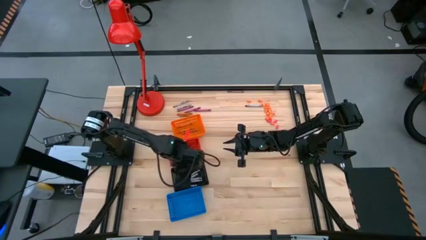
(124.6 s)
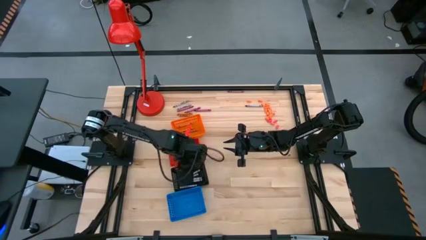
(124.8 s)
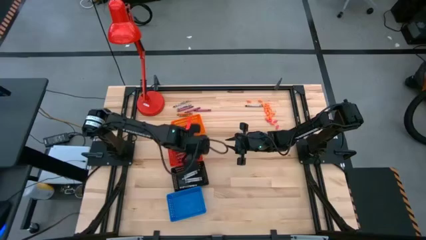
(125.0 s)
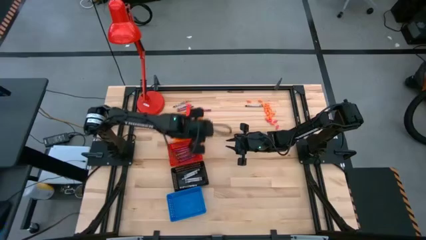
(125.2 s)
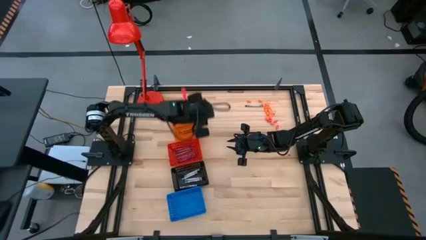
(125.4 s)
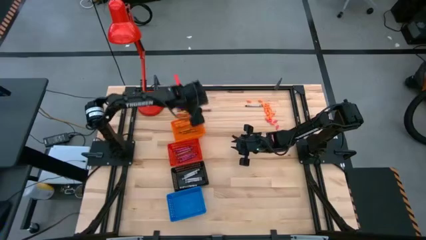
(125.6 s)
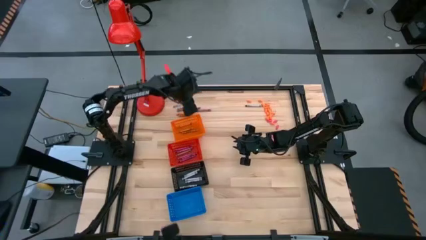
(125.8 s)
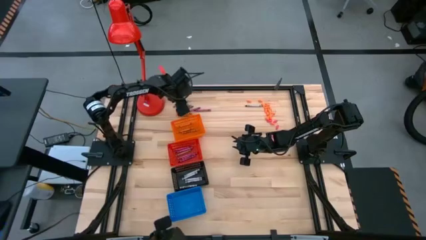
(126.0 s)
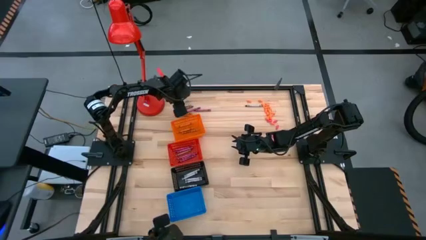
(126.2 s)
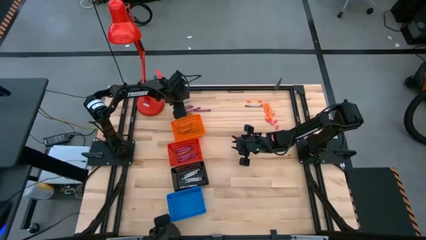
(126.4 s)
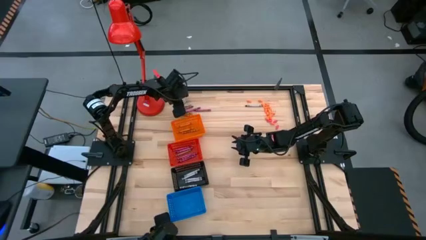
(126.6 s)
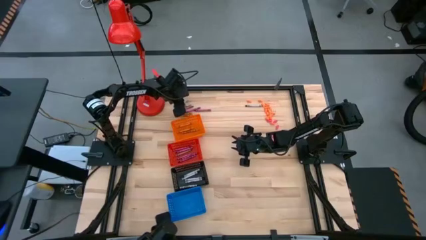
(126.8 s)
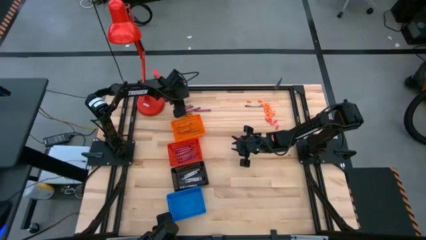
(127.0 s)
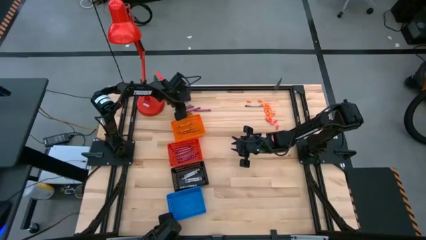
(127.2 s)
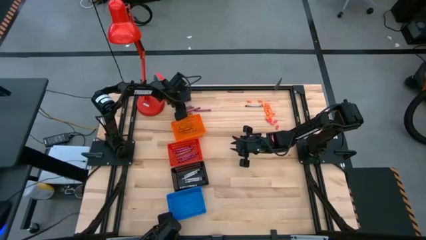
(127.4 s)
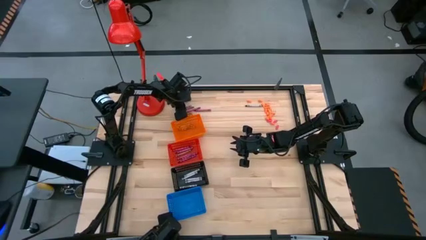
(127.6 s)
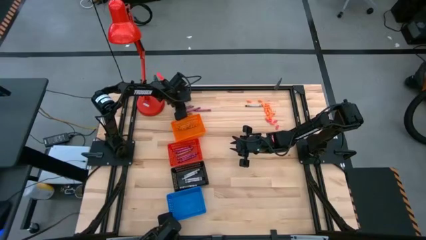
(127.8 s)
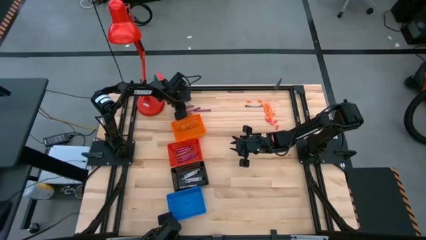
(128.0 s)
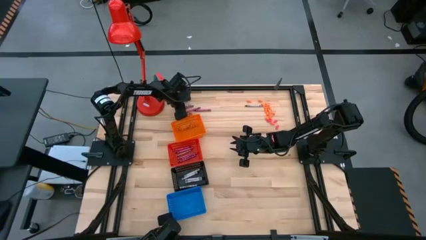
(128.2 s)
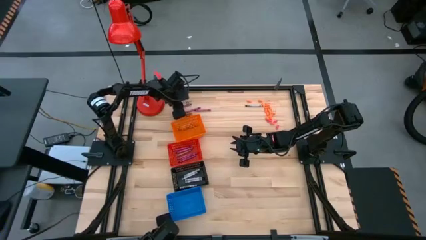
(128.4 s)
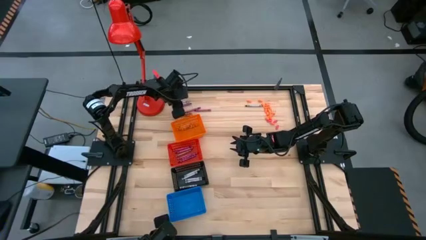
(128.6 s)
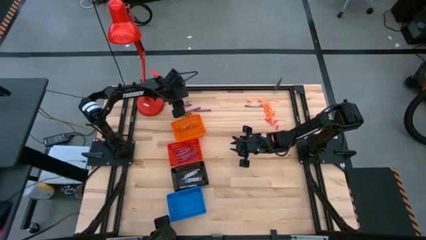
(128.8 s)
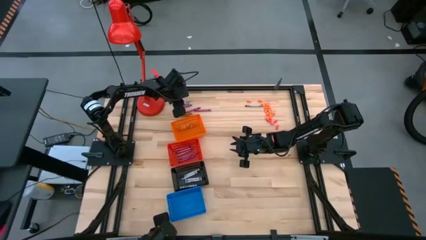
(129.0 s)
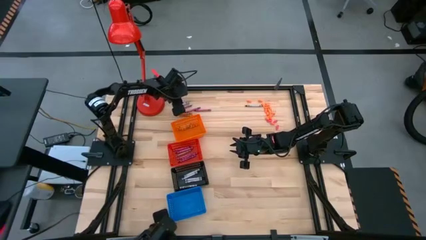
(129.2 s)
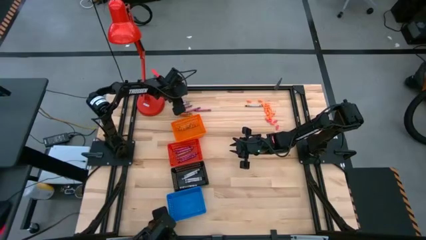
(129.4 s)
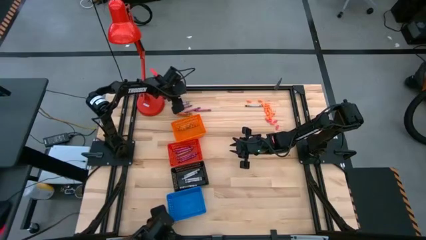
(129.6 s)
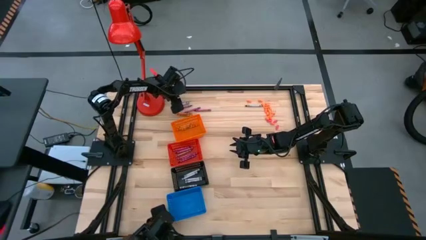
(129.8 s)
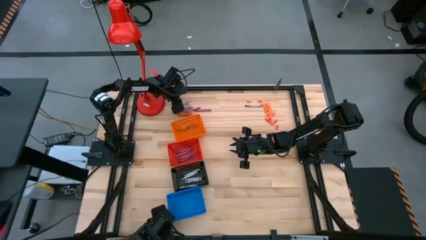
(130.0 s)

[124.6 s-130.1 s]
Task: Sort crayons
Put the black crayon into the black basket

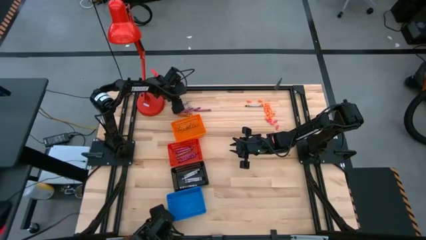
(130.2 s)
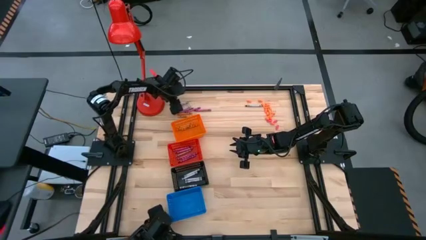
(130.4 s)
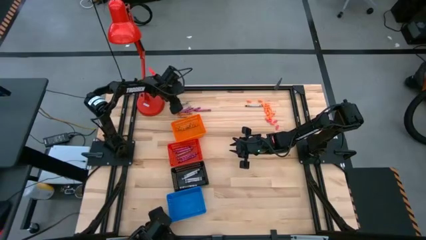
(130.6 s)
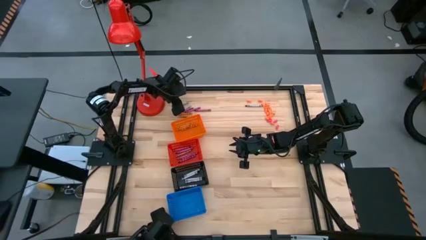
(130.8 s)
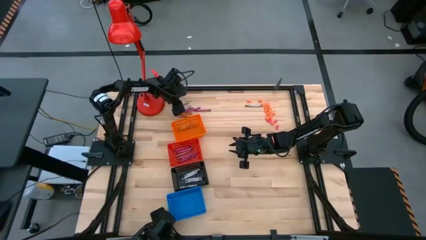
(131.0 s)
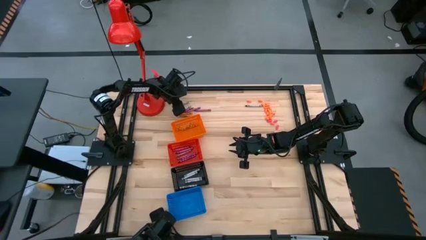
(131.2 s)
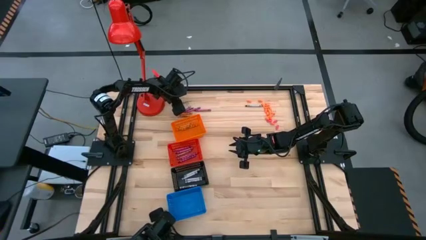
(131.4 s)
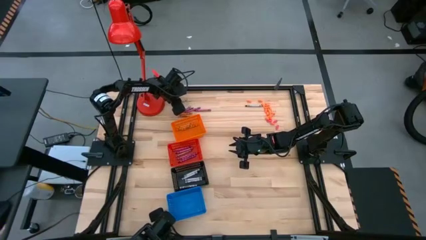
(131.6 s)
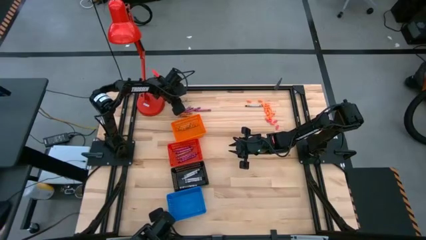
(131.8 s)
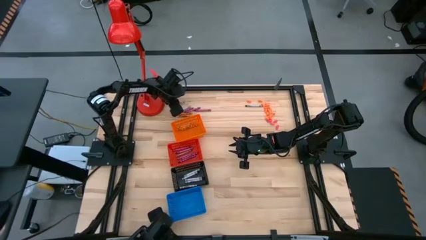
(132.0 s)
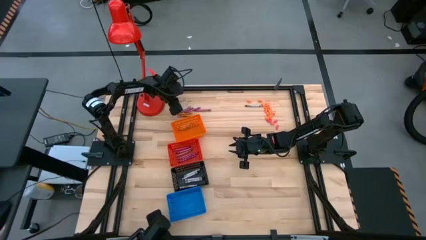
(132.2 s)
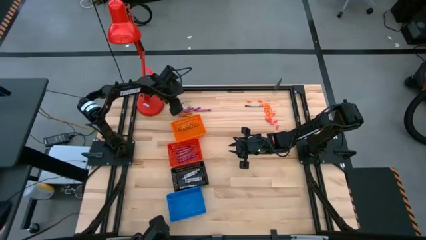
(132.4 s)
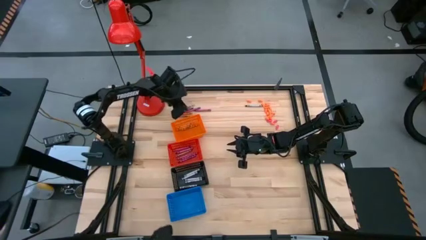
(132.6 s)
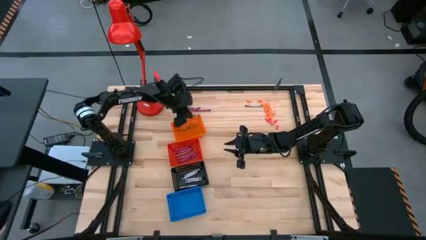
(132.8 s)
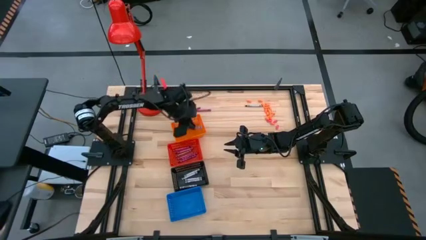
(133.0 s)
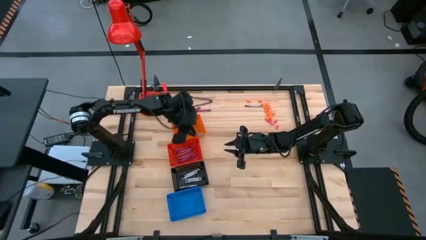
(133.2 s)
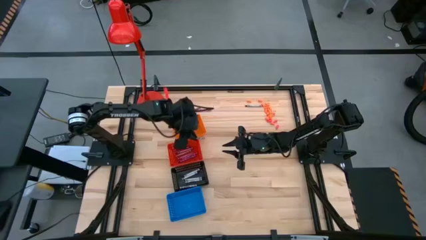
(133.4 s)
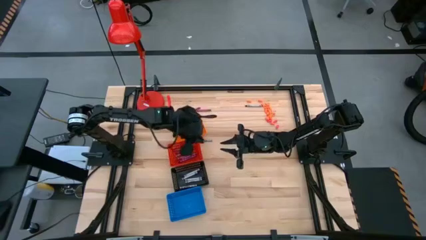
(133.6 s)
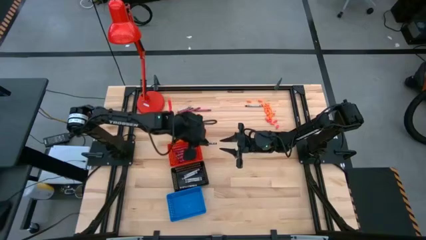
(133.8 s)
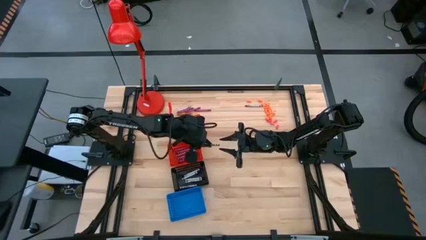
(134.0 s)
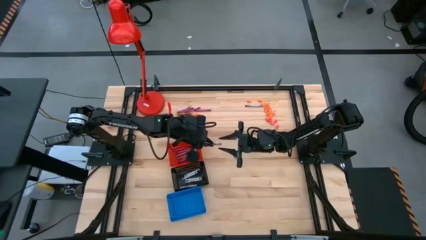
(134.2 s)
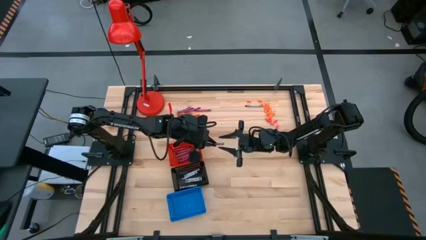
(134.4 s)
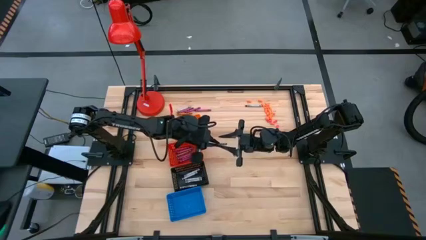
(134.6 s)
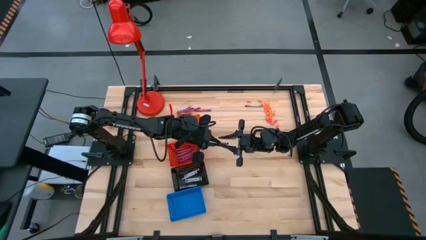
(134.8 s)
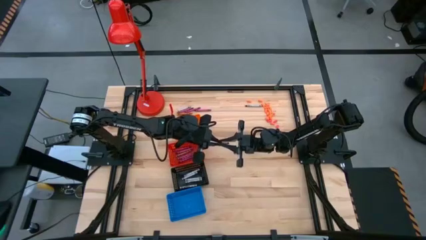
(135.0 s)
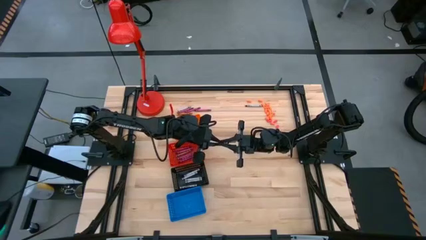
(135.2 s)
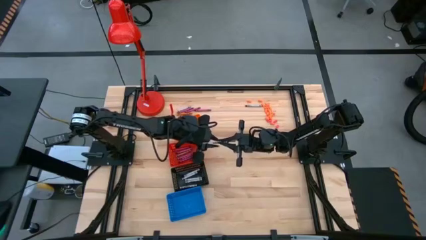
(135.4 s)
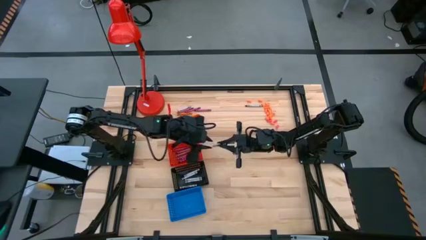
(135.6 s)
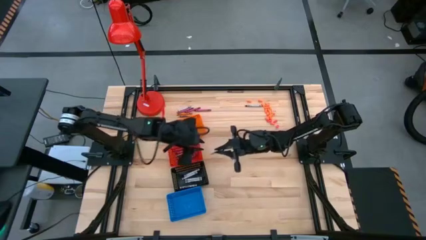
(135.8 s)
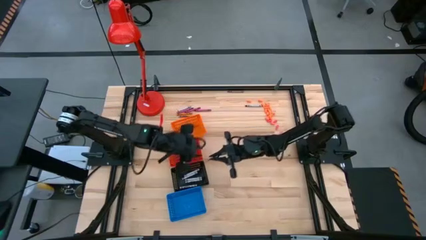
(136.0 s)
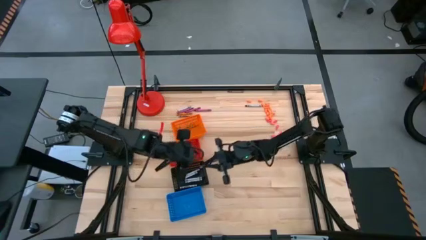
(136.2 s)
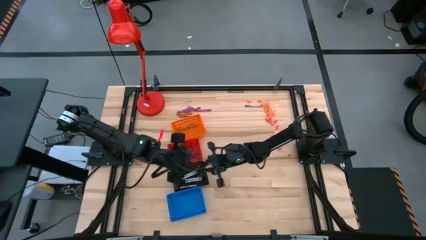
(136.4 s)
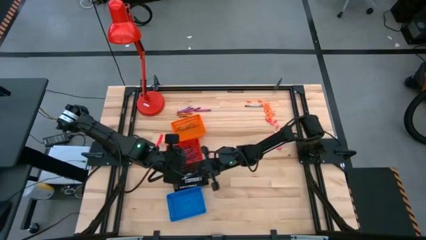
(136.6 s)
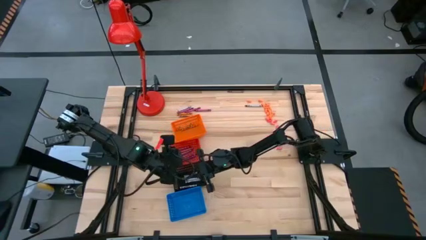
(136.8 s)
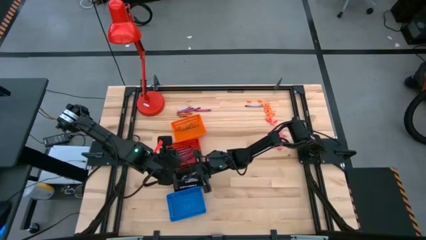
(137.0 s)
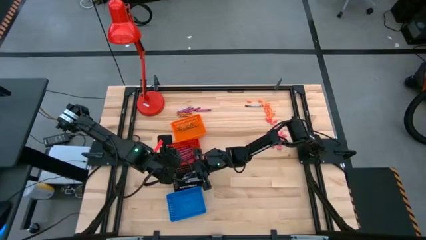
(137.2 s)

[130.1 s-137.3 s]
Put the black crayon into the black basket
